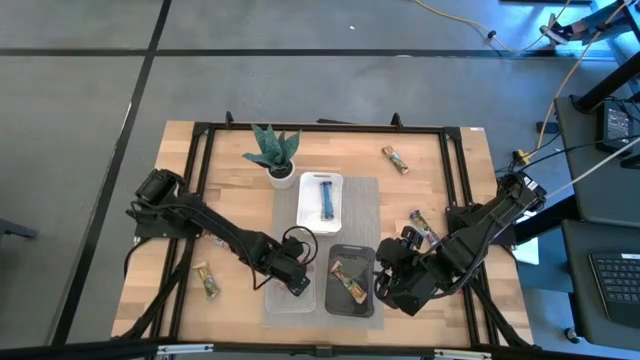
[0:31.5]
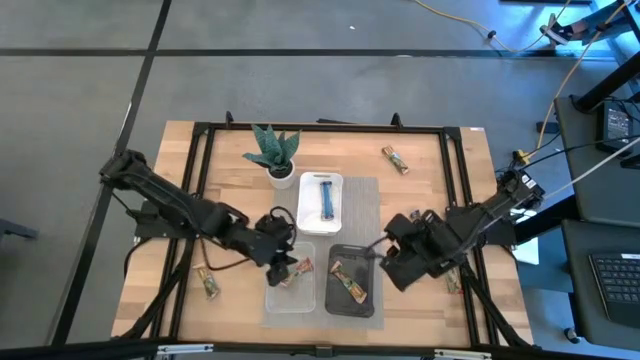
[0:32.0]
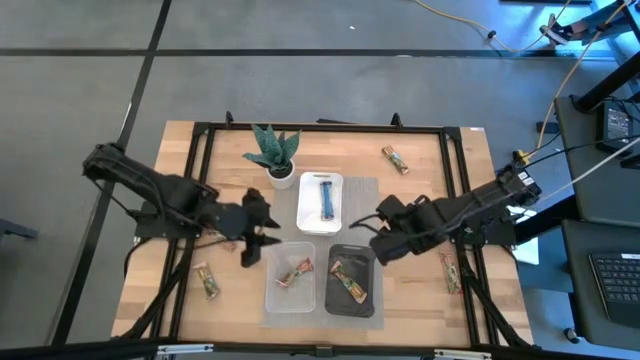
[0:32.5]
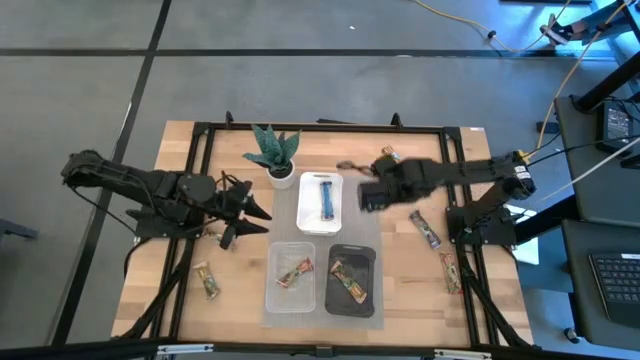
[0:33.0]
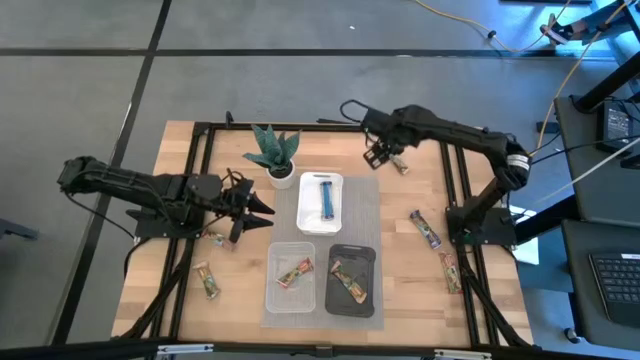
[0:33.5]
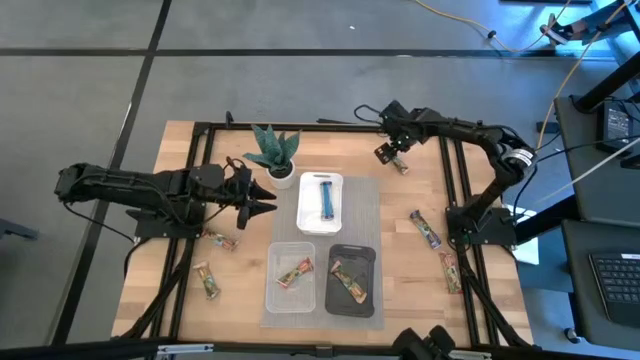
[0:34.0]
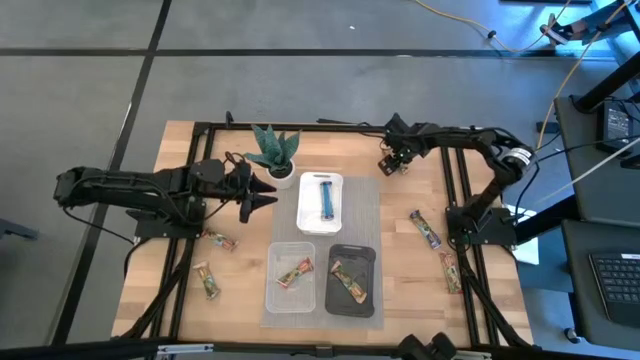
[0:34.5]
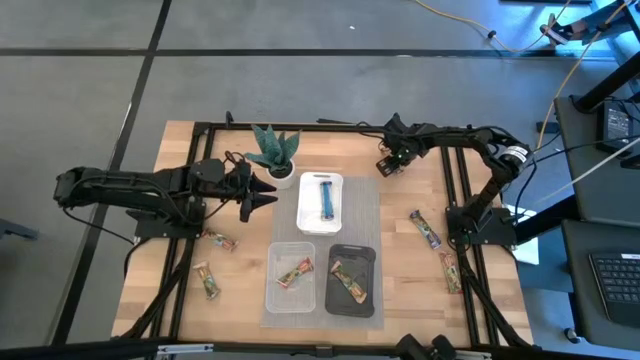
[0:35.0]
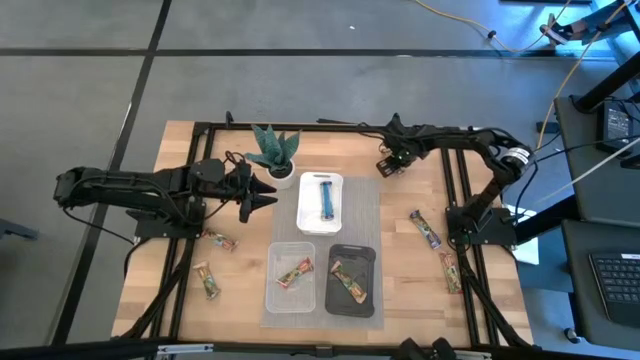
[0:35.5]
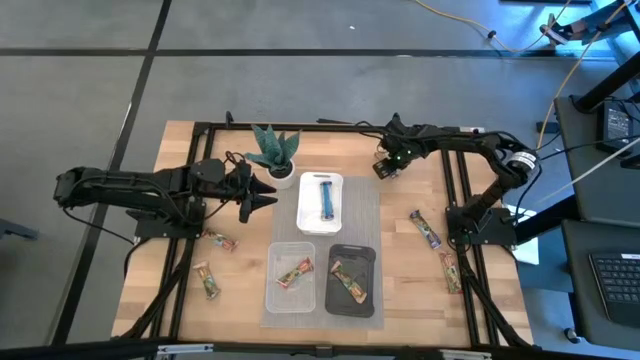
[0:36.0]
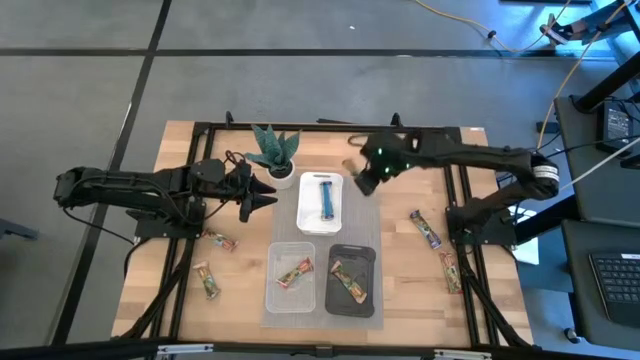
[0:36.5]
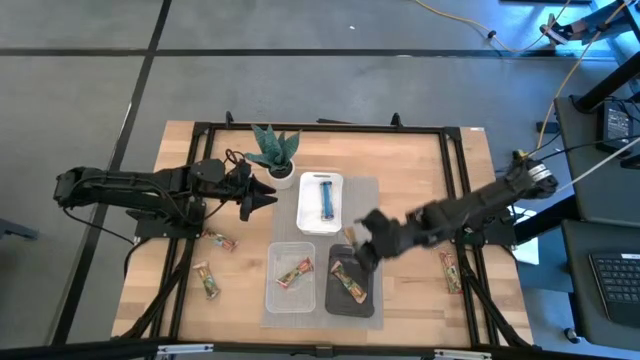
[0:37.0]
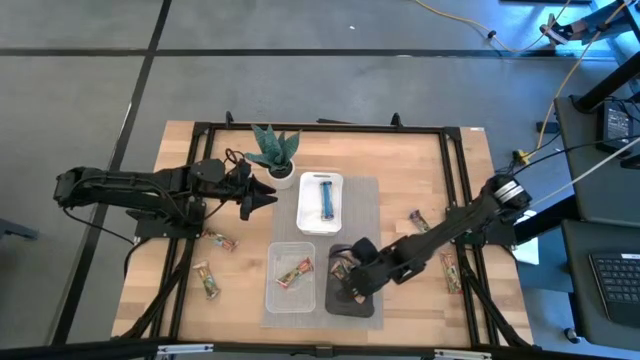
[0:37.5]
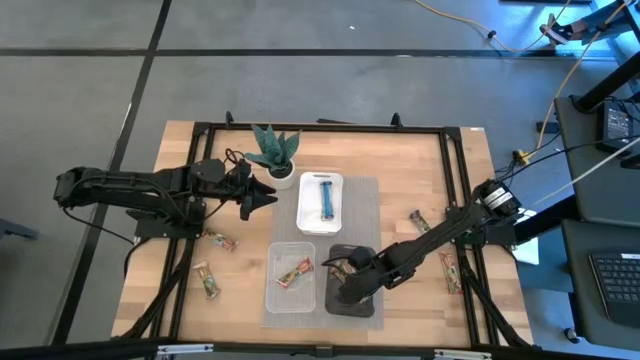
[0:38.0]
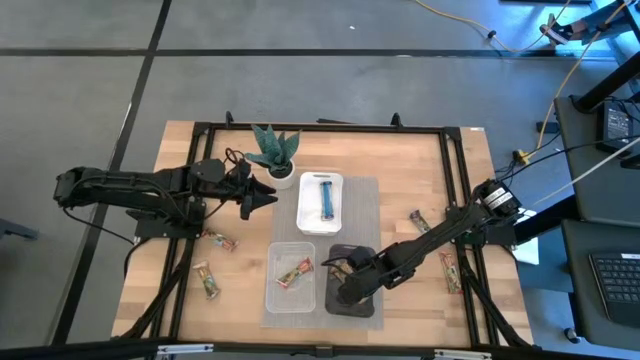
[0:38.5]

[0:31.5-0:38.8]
Task: Pick and place Granola Bars by type
Put the top yellow granola bar into the black bin

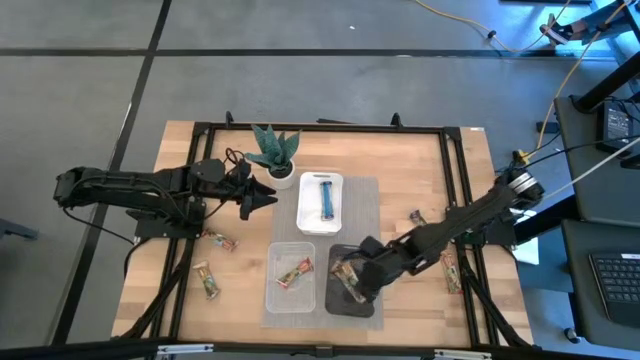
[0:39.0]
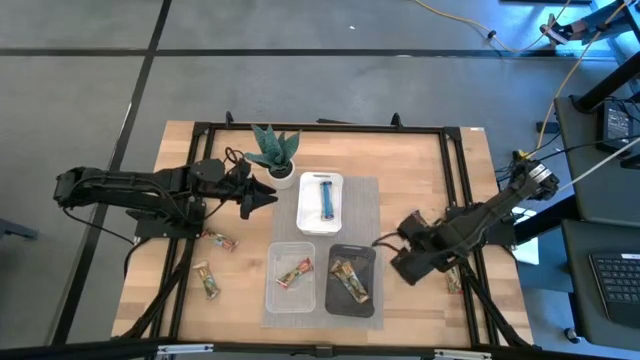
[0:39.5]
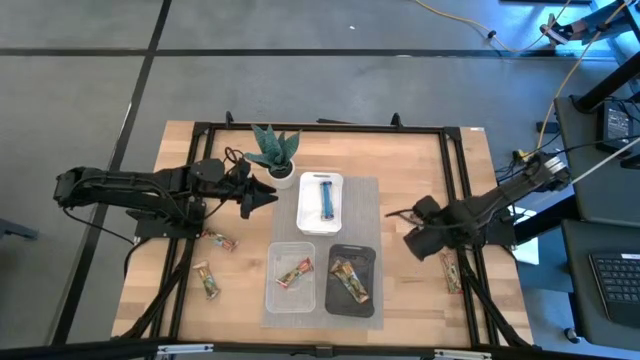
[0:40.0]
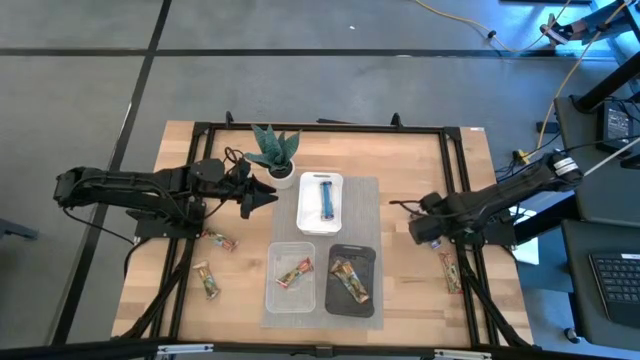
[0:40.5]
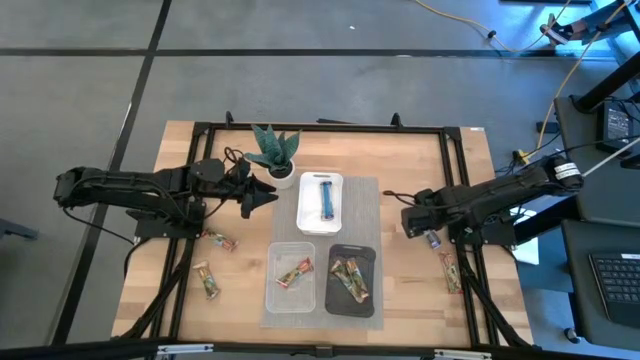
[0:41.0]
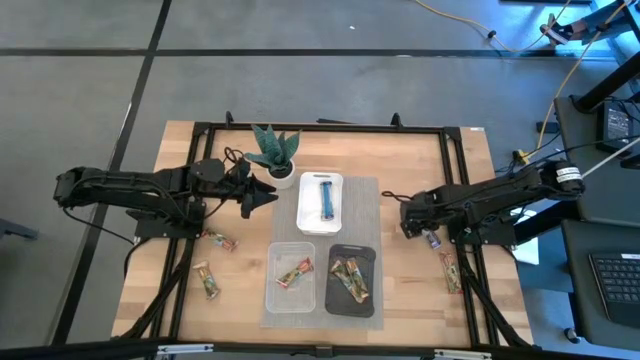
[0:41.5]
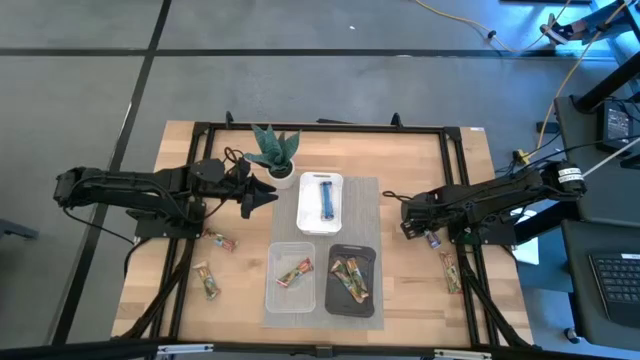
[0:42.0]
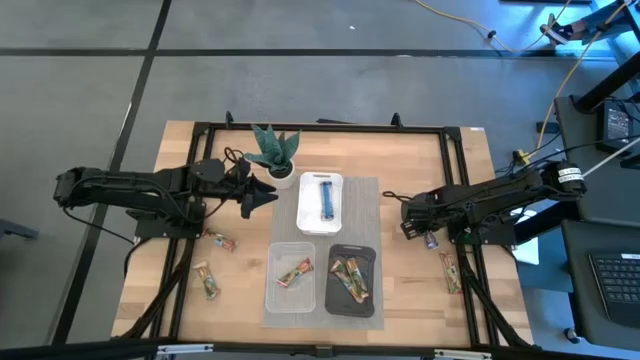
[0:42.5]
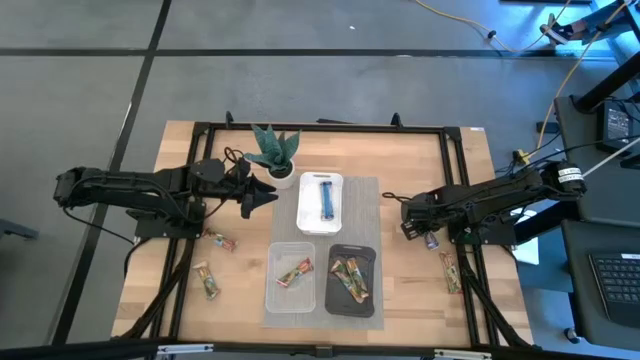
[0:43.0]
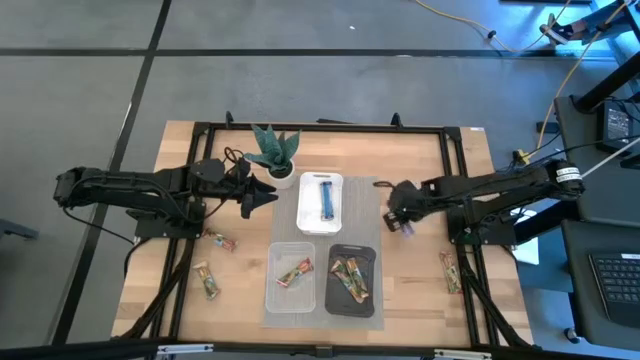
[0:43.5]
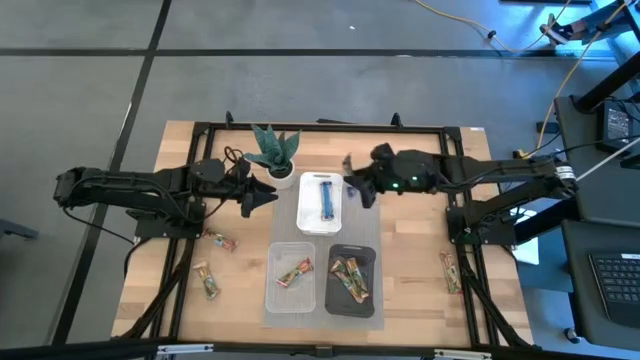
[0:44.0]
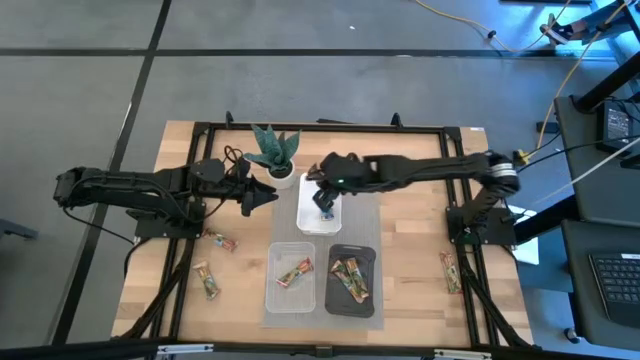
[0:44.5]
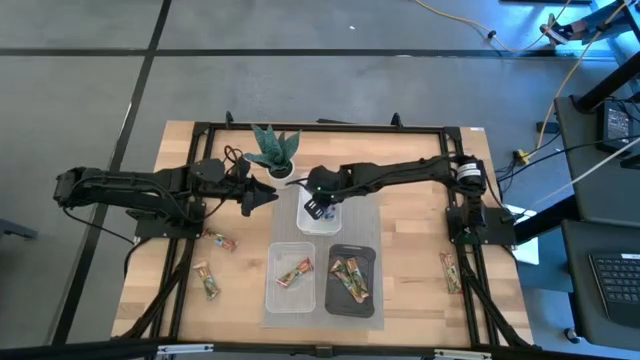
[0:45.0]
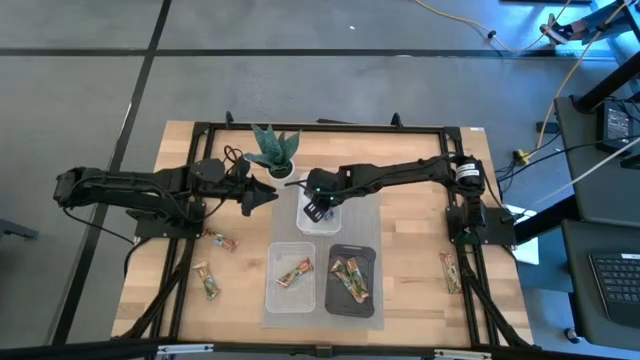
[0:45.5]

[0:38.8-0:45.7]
Put the blue granola bar into the white bin

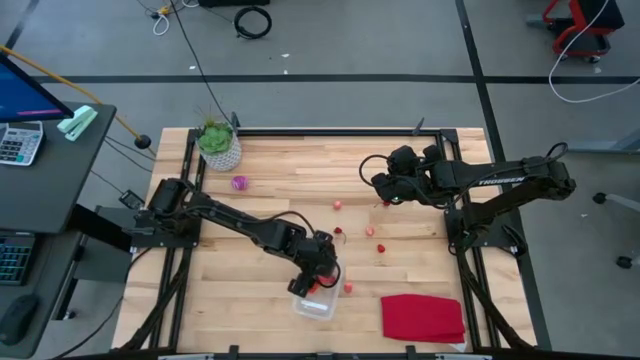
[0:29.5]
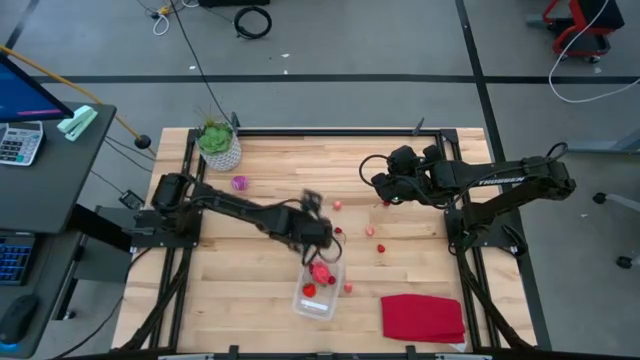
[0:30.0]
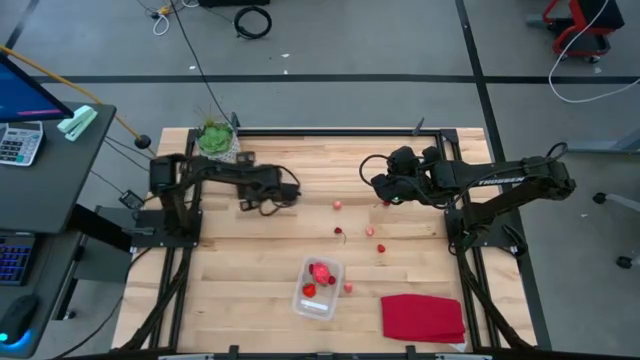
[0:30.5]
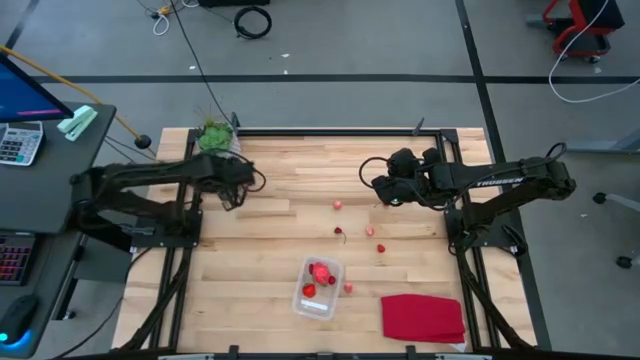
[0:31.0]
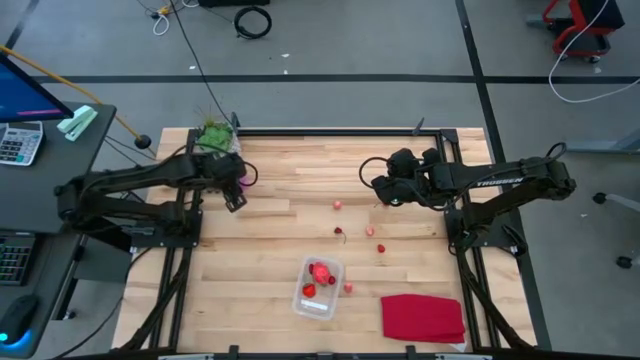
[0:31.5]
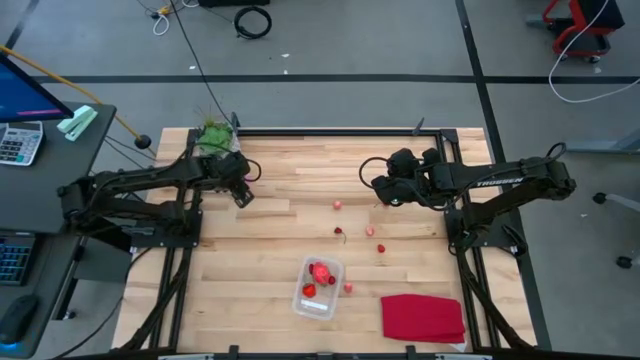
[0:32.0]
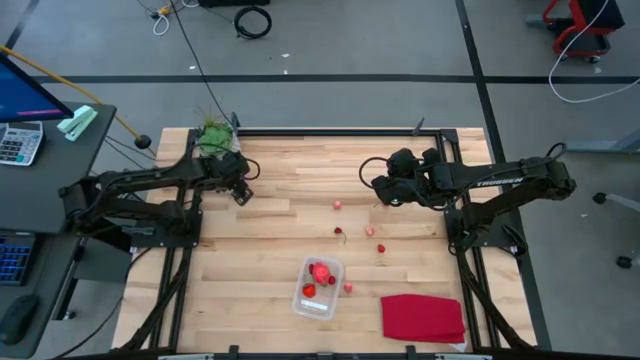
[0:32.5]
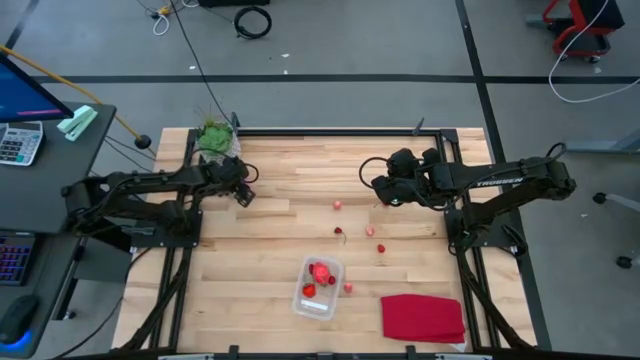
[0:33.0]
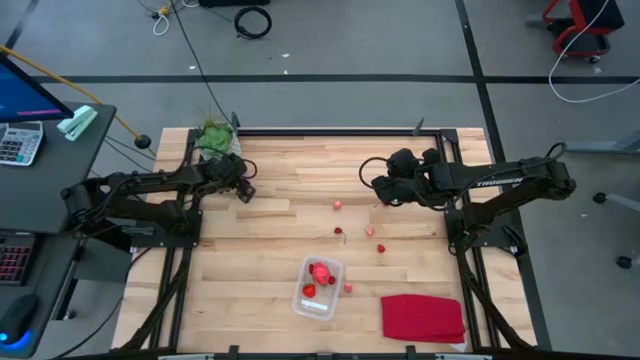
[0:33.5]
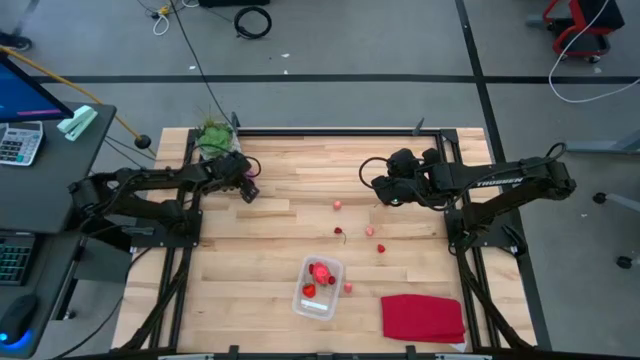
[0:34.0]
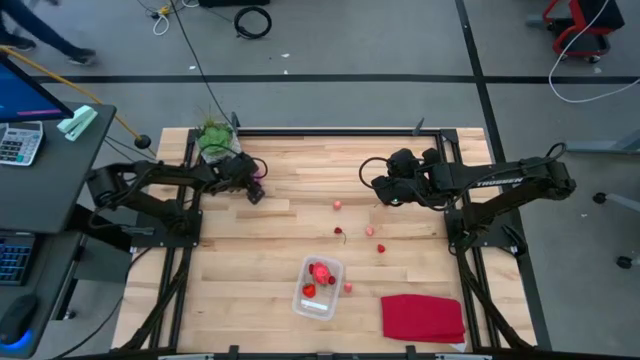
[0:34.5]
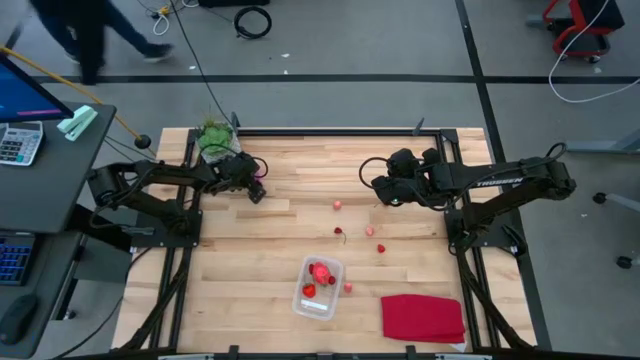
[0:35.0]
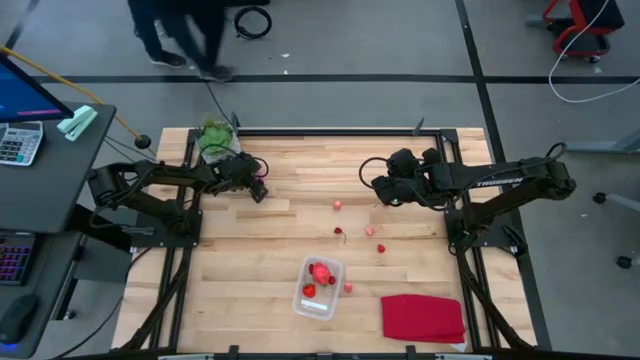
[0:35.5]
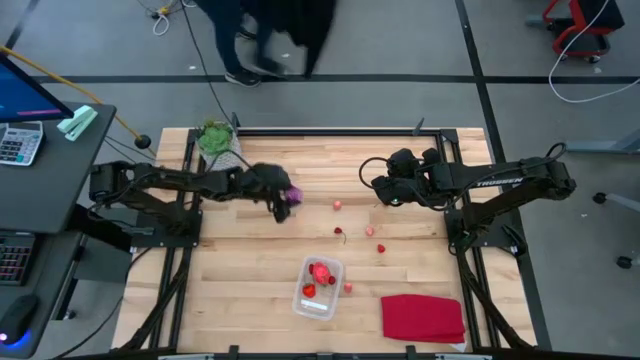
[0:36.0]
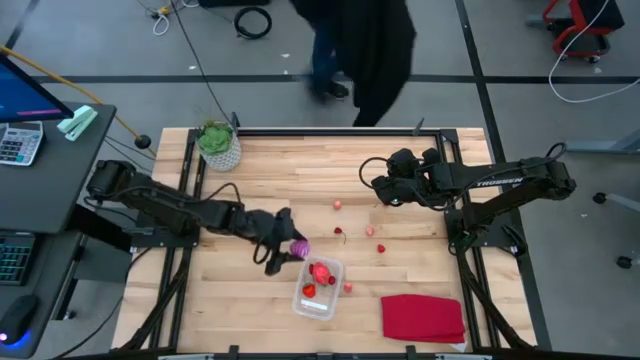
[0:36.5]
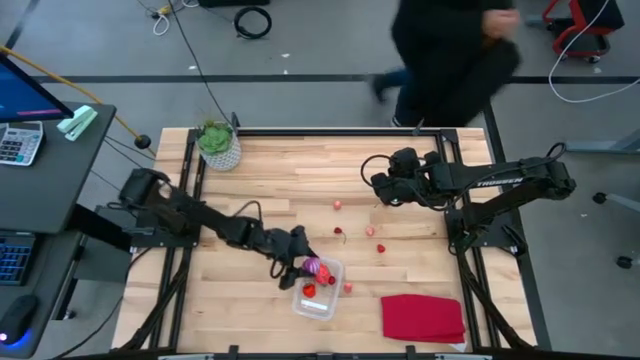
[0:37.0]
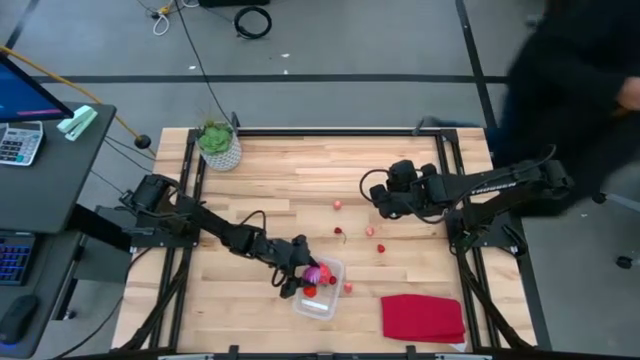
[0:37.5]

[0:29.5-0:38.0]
Task: Pick and placing Produce into tupperware
Put the purple onion into the transparent bin
